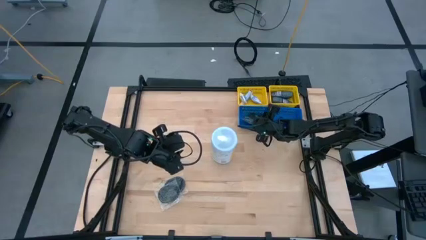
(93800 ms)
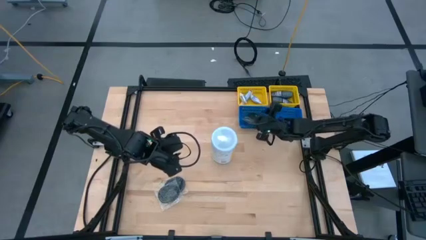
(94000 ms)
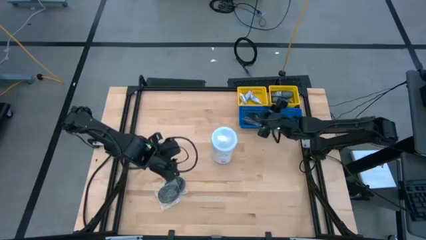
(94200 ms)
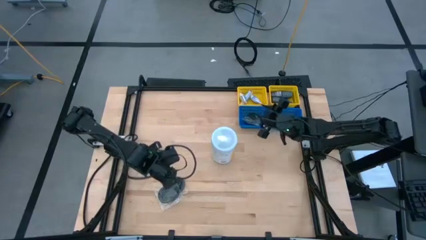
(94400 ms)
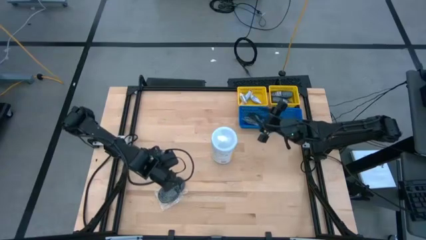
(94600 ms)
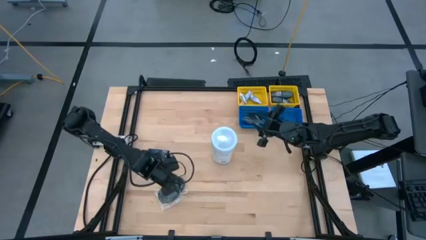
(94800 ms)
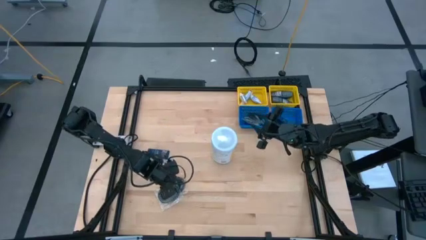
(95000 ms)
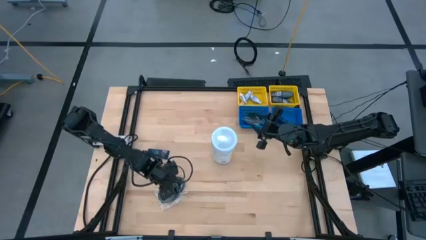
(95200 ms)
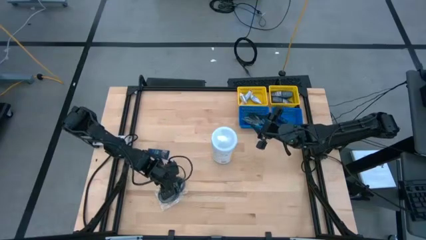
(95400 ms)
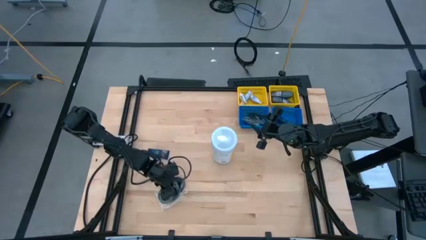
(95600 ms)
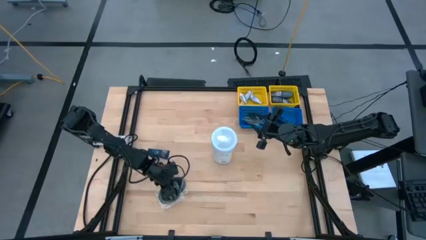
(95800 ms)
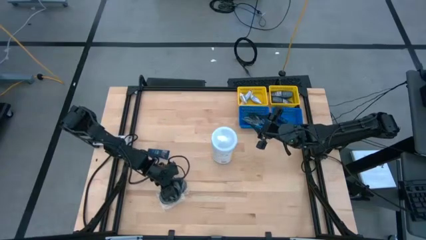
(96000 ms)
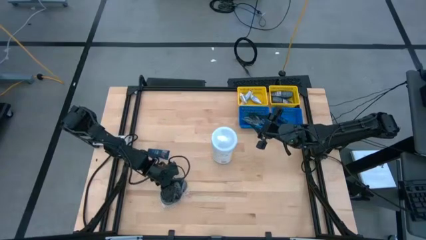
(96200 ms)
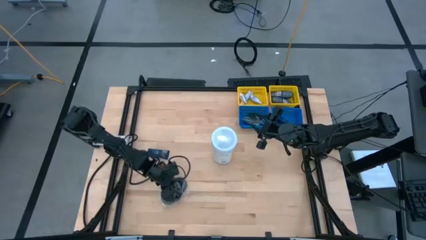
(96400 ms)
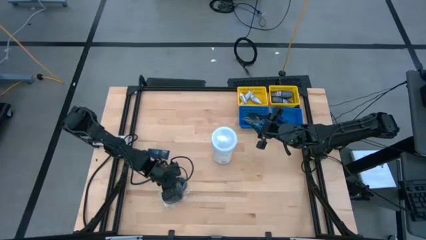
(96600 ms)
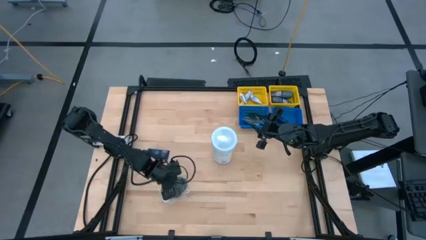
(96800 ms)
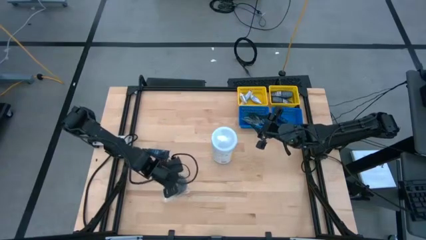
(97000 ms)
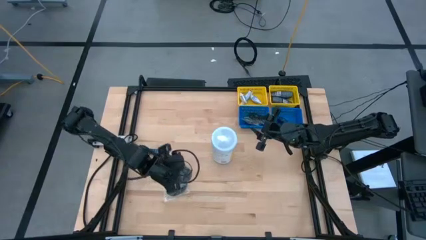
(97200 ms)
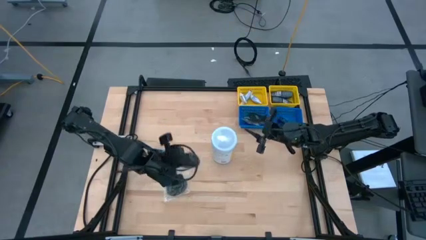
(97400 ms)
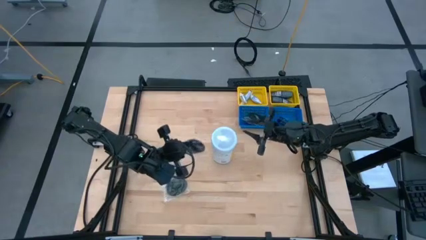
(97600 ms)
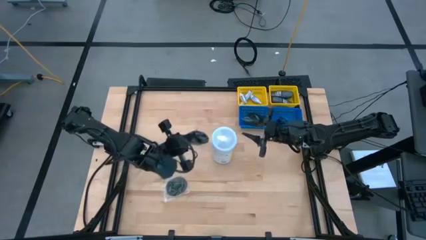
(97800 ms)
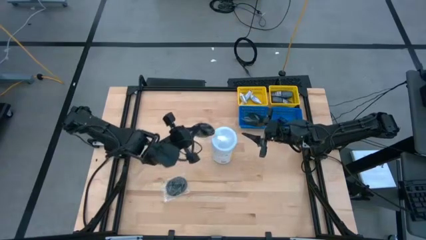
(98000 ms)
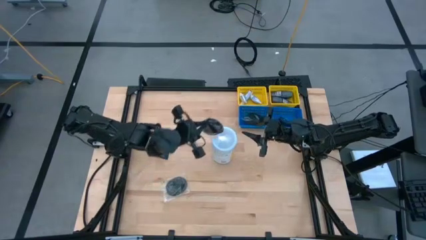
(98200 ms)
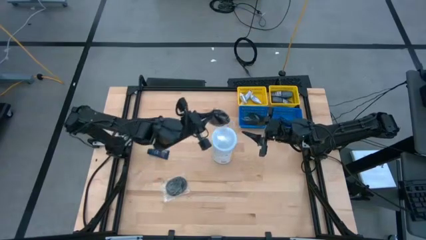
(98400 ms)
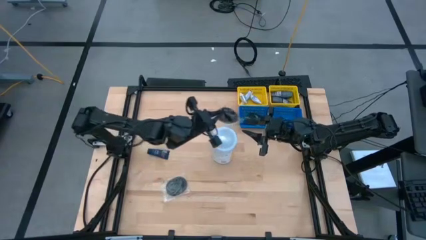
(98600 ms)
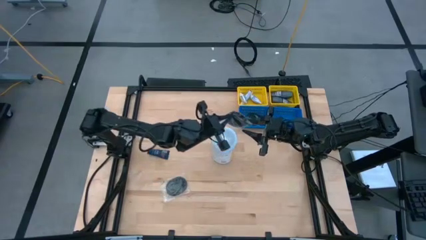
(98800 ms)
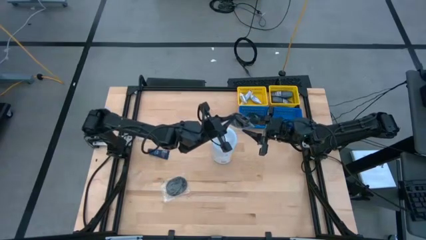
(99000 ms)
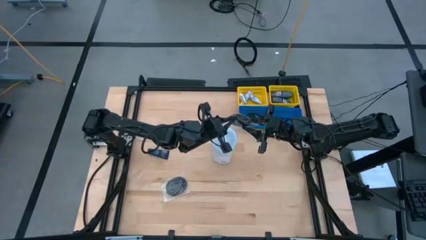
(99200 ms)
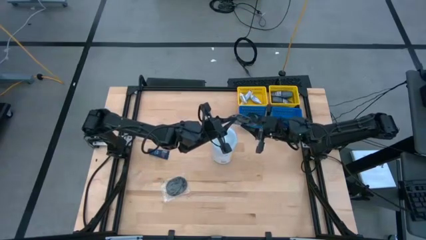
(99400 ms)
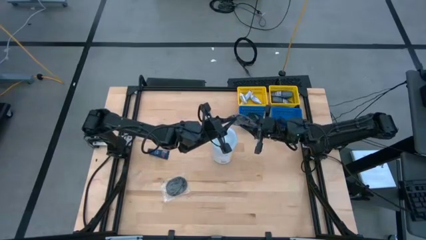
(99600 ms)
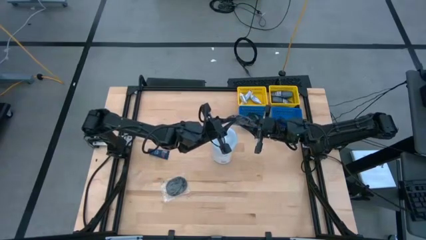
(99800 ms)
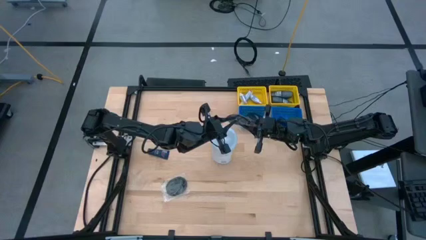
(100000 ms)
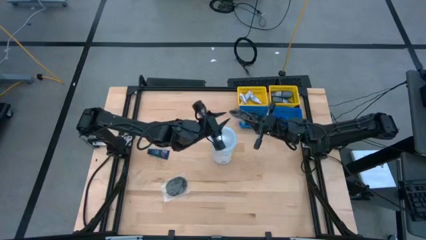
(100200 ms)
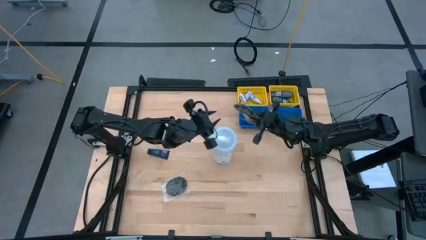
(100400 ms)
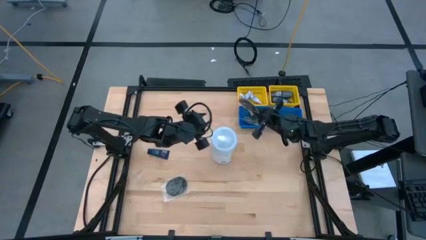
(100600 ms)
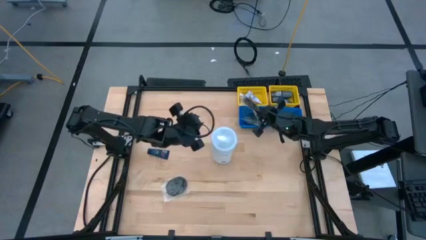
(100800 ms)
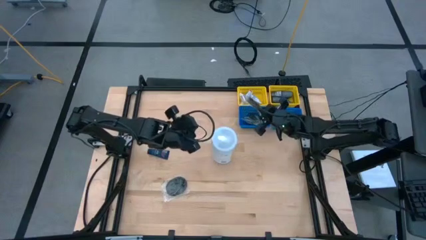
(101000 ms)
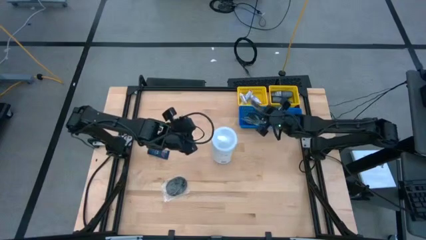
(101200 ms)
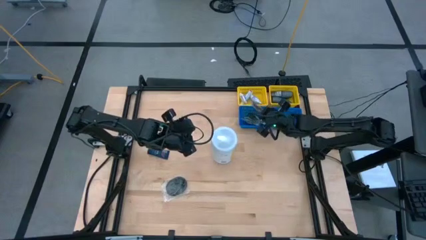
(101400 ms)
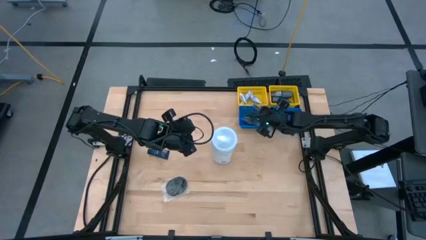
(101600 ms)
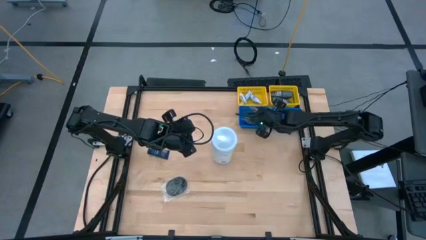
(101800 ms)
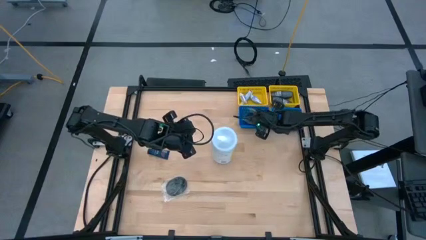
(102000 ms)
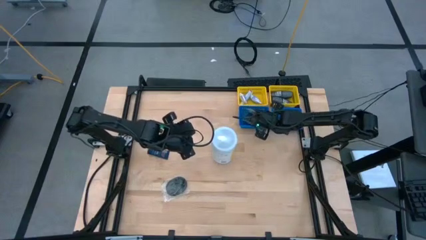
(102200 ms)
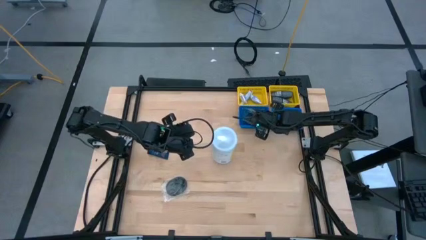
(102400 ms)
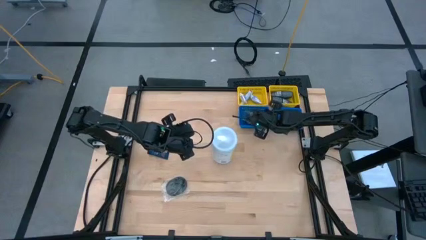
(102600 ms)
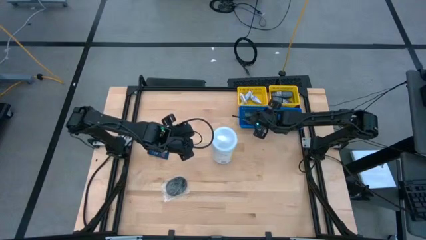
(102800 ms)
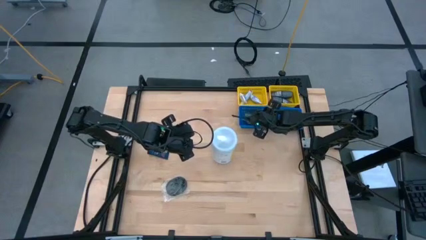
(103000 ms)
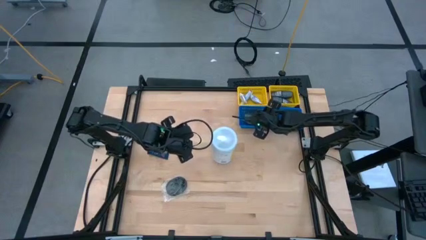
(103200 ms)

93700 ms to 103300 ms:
Task: Pick & Place Travel size toiletries
Put the black hair brush into the left blue bin

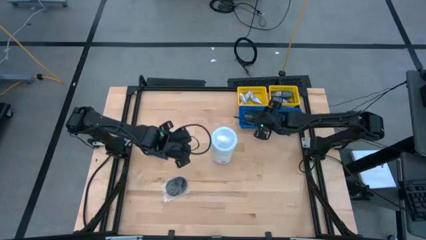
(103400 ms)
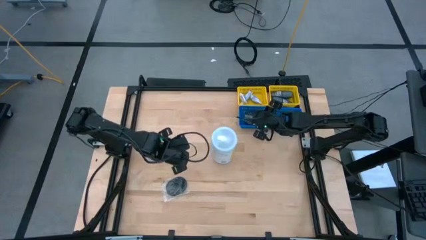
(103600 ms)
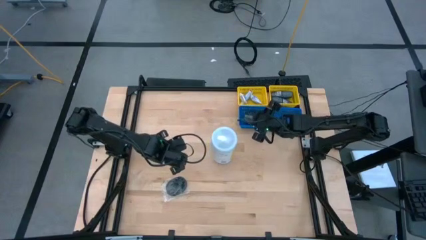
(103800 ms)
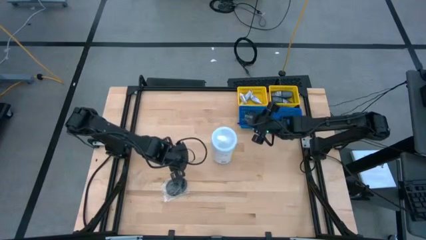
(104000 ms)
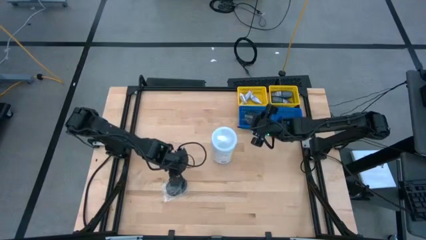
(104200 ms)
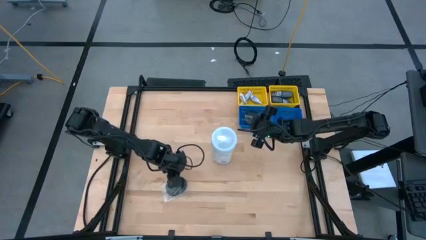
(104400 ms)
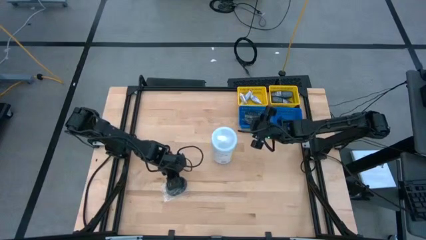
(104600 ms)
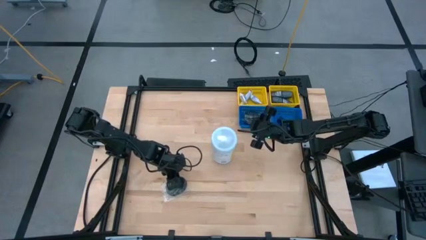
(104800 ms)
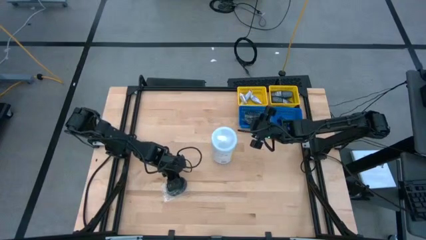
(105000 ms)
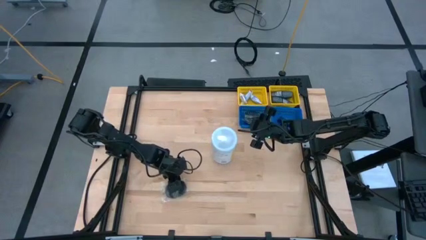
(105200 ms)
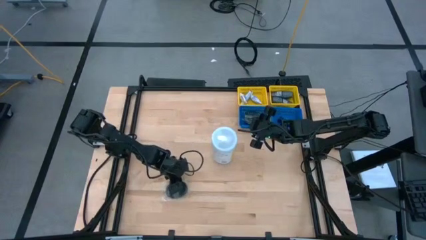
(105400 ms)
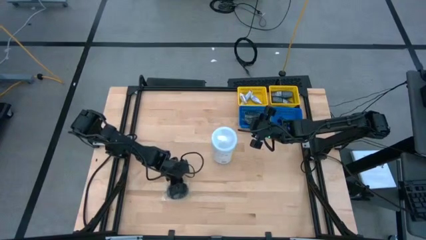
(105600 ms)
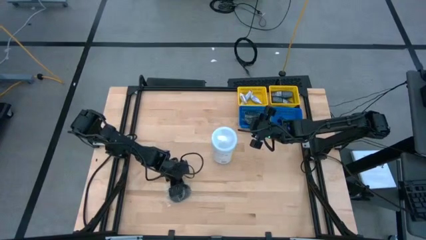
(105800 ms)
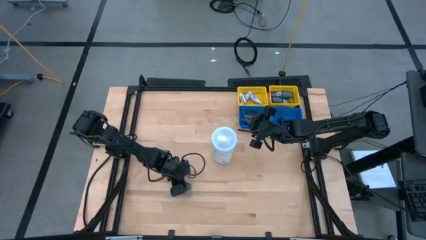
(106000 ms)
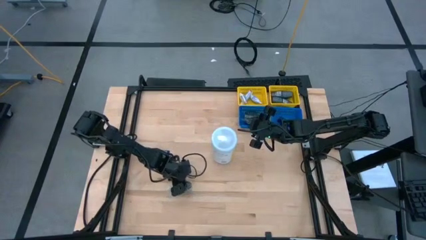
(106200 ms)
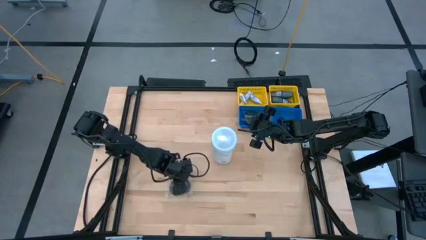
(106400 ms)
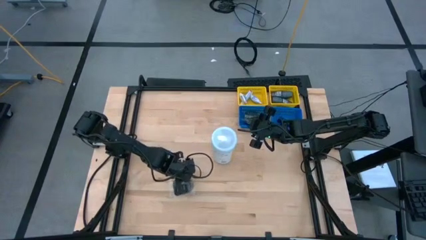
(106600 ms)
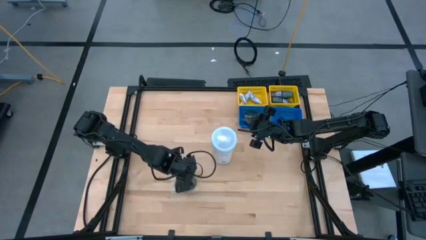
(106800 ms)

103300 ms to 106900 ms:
Put the black hair brush into the left blue bin

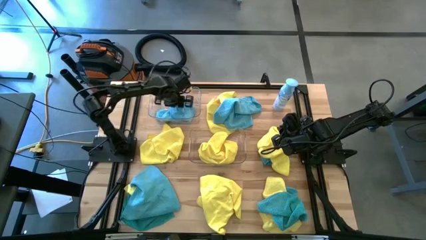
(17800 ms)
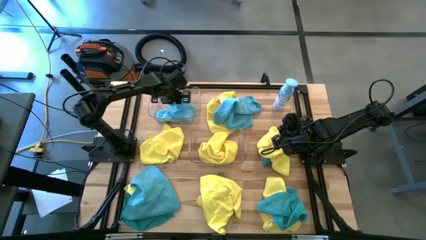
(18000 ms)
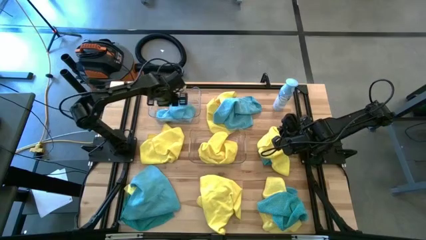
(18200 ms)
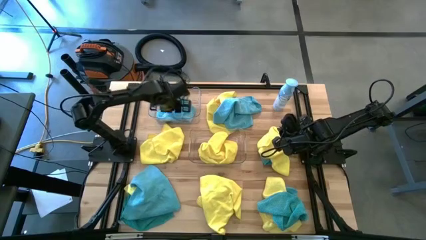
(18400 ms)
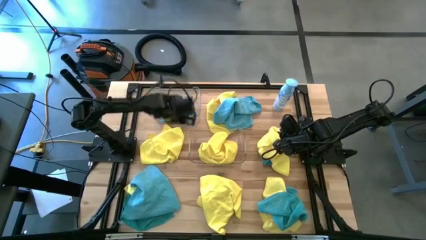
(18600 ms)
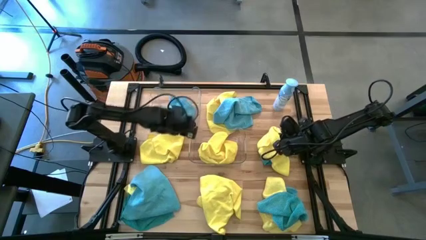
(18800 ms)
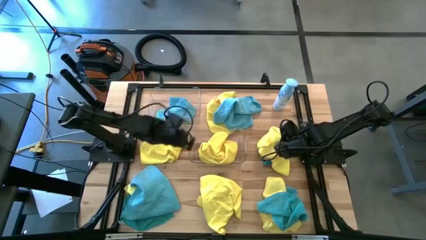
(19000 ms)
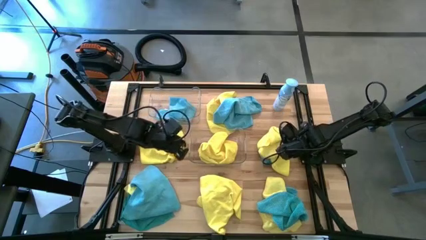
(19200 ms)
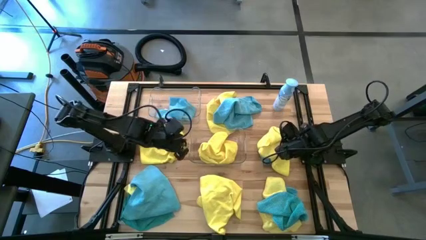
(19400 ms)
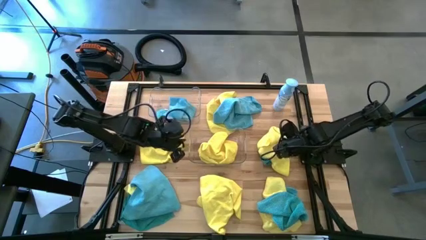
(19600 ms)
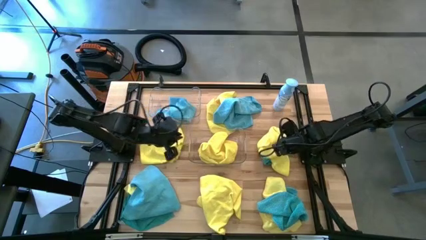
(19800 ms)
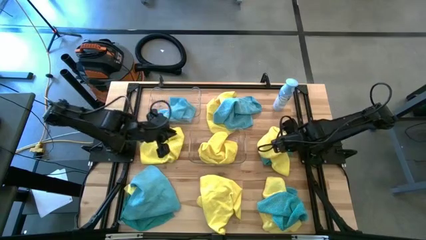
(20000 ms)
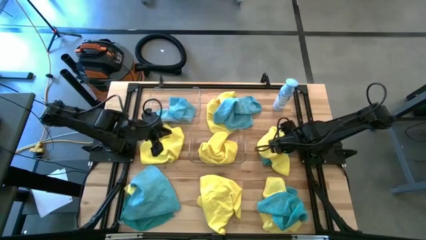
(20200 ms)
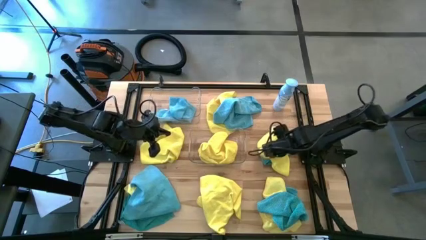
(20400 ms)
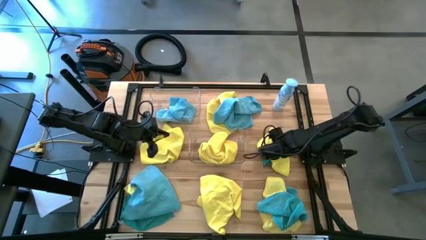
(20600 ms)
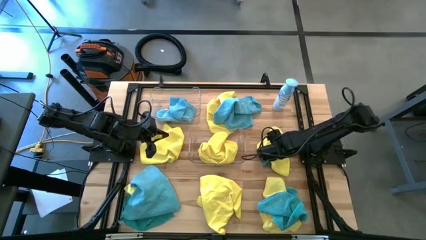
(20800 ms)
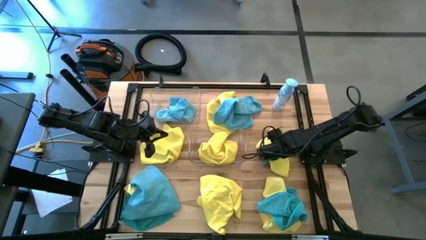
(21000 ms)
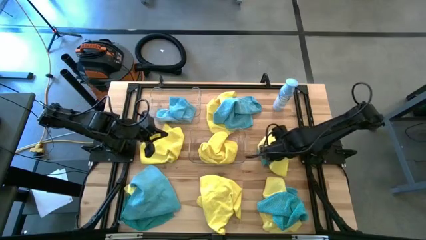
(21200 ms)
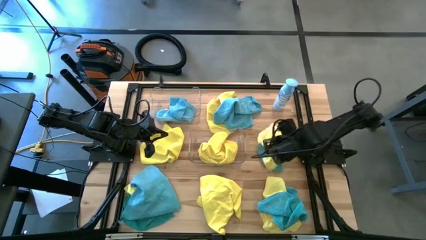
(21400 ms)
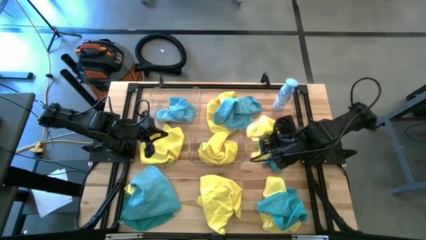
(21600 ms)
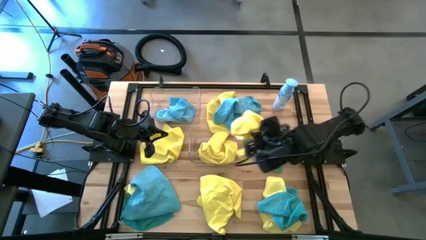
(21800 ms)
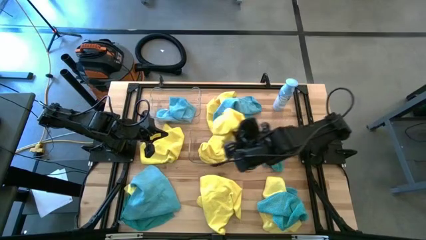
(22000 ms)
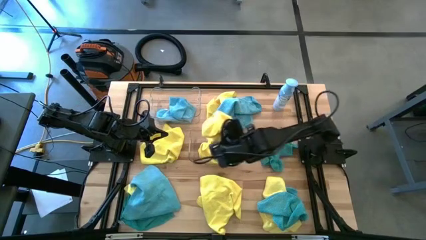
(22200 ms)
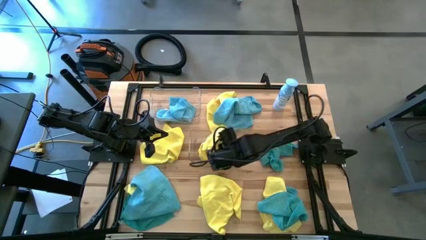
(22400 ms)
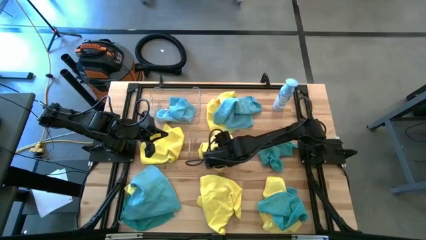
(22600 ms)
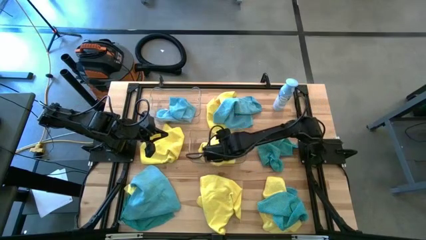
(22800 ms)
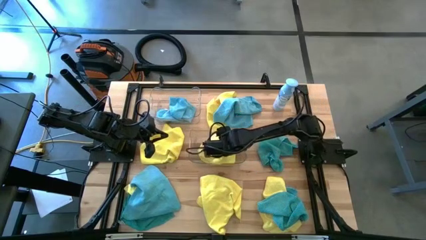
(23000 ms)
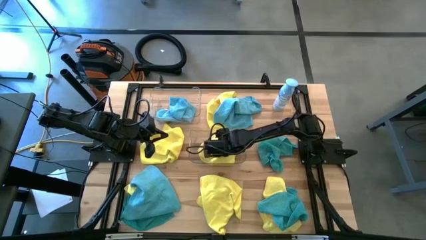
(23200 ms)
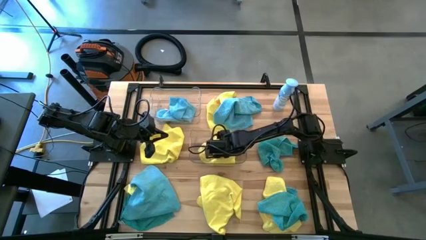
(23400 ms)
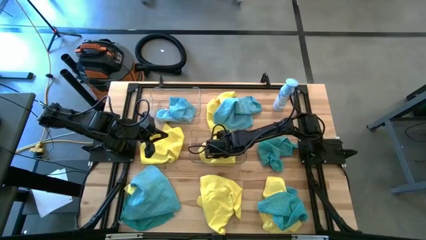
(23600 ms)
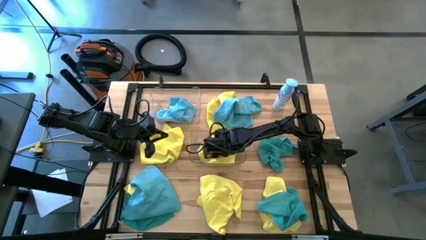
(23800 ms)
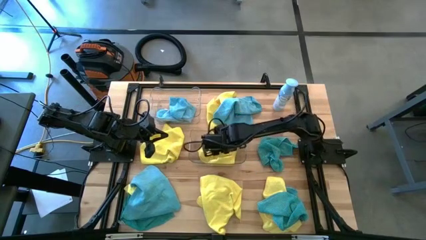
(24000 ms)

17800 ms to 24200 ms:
Task: Sort microfiber towel by color & place in baskets
Put the yellow towel into the bottom transparent bin
